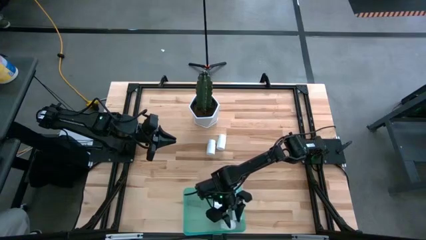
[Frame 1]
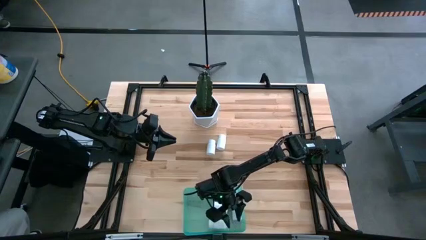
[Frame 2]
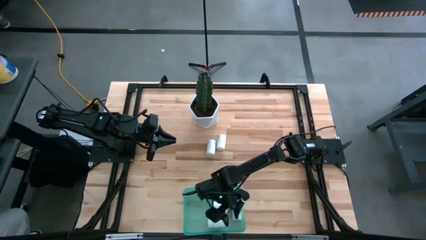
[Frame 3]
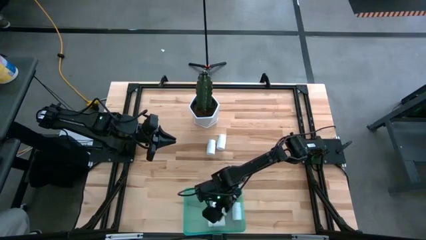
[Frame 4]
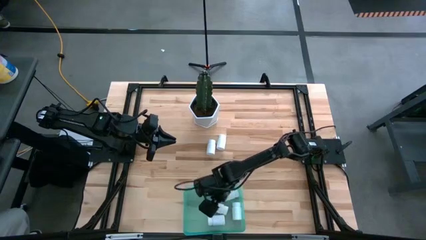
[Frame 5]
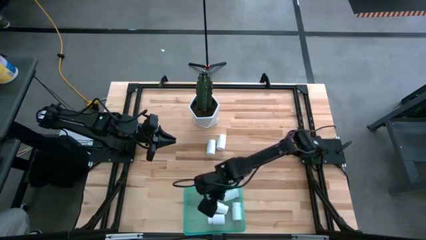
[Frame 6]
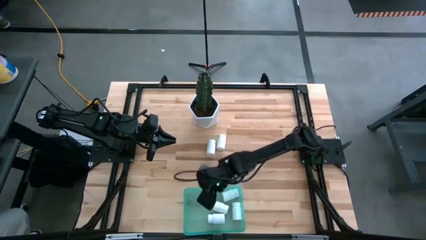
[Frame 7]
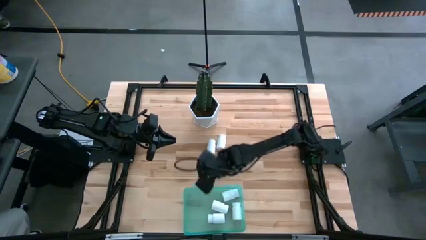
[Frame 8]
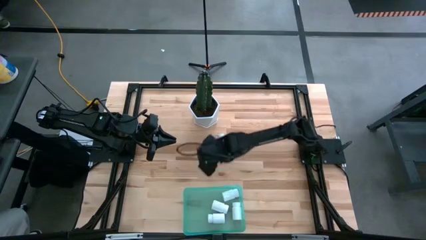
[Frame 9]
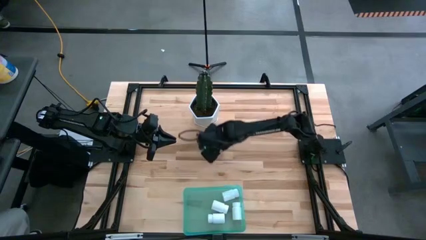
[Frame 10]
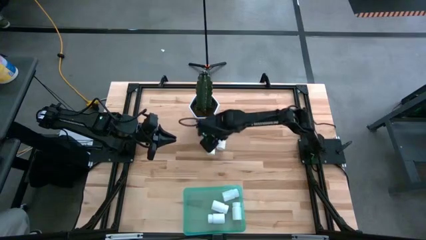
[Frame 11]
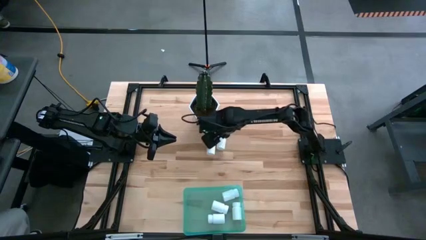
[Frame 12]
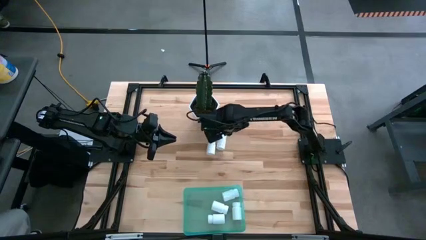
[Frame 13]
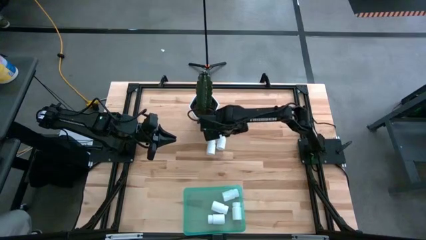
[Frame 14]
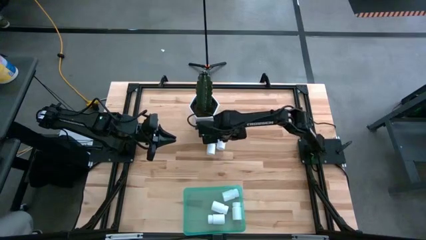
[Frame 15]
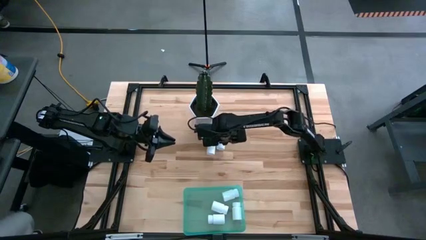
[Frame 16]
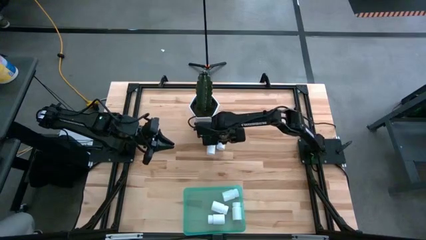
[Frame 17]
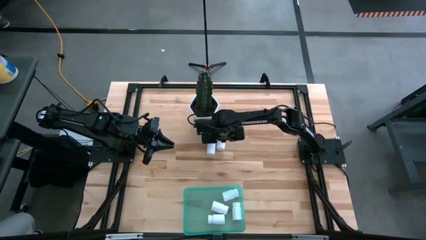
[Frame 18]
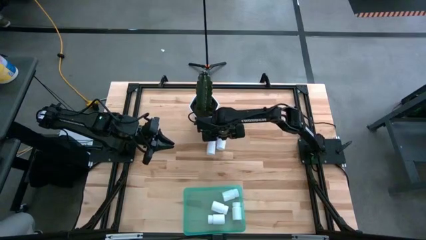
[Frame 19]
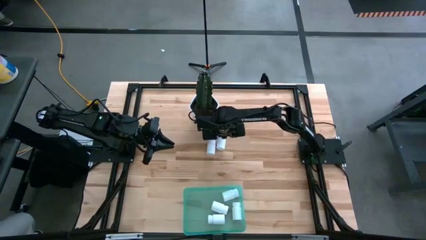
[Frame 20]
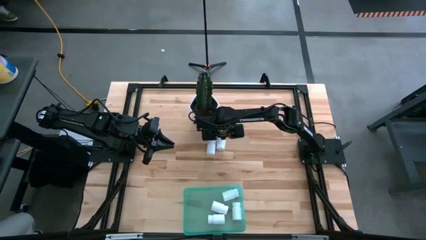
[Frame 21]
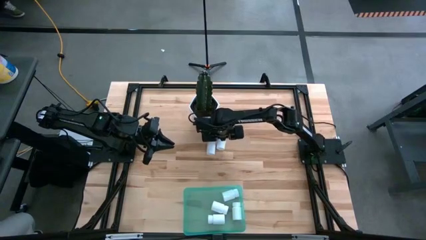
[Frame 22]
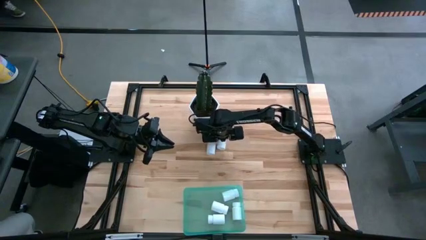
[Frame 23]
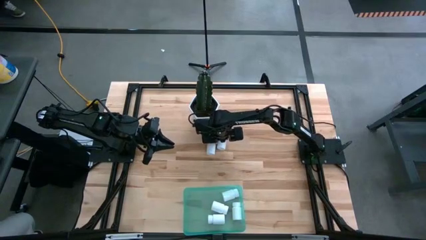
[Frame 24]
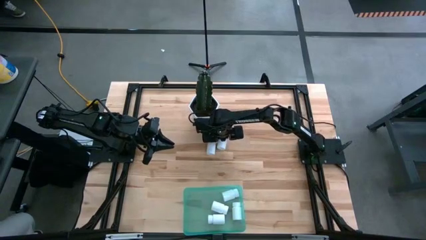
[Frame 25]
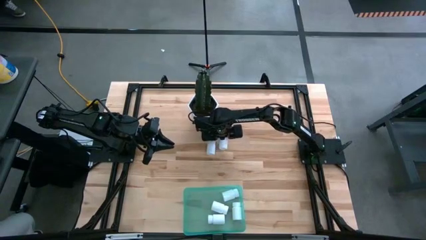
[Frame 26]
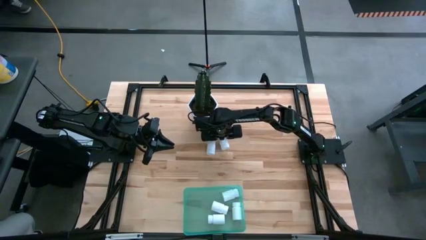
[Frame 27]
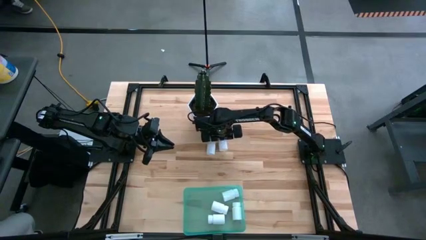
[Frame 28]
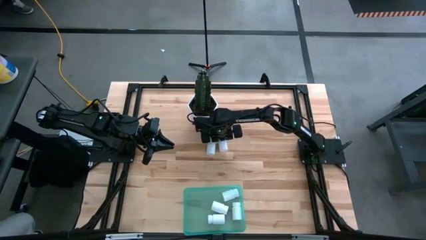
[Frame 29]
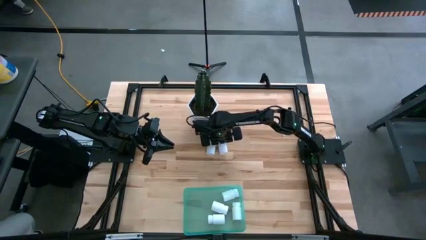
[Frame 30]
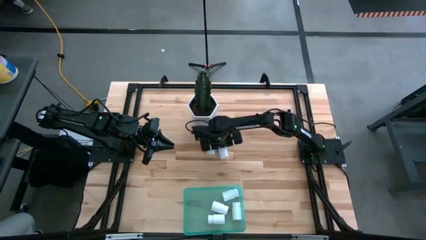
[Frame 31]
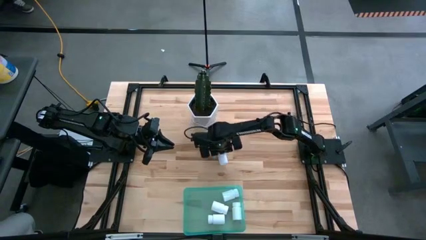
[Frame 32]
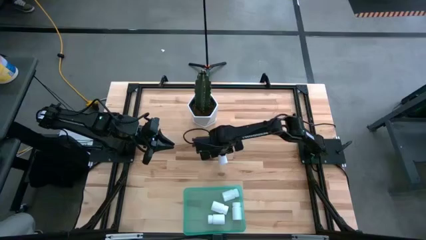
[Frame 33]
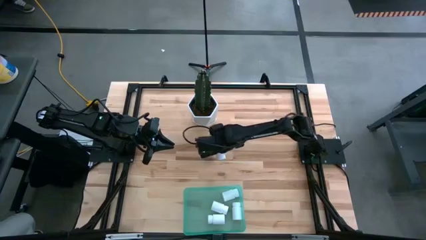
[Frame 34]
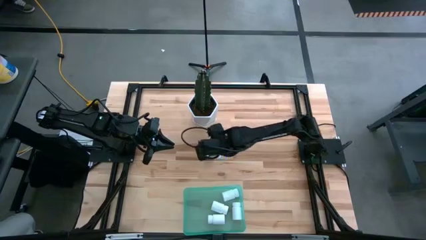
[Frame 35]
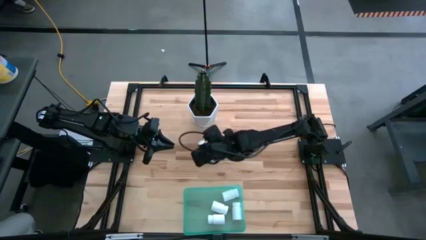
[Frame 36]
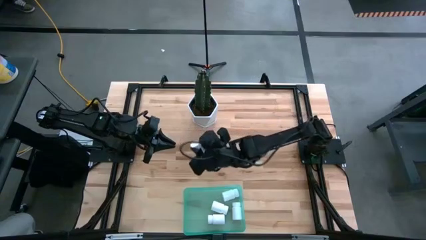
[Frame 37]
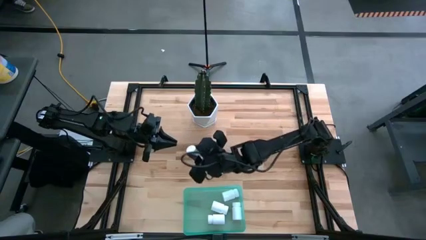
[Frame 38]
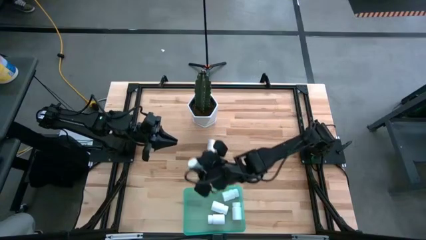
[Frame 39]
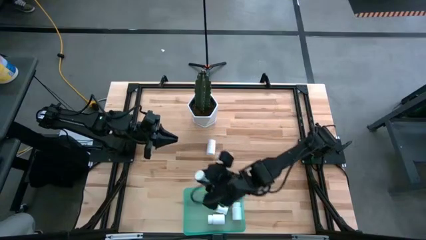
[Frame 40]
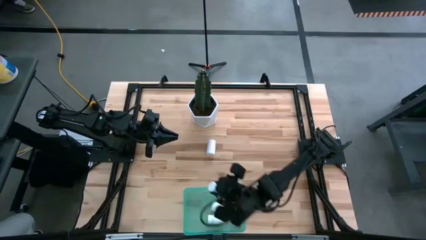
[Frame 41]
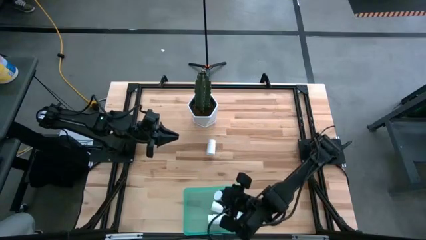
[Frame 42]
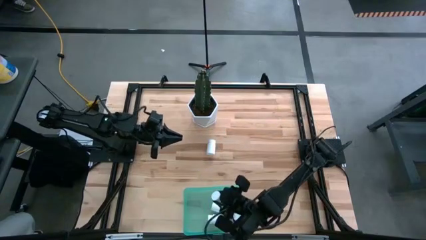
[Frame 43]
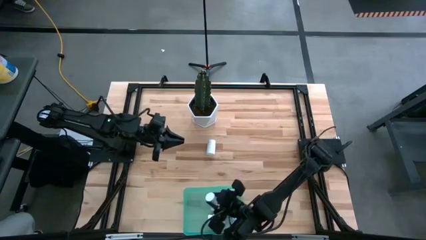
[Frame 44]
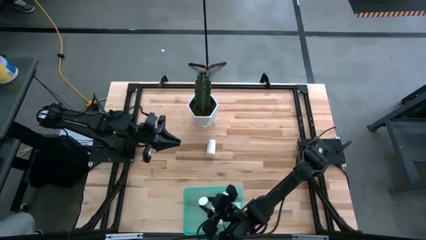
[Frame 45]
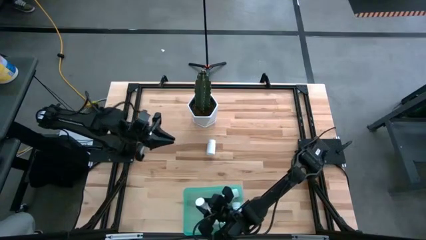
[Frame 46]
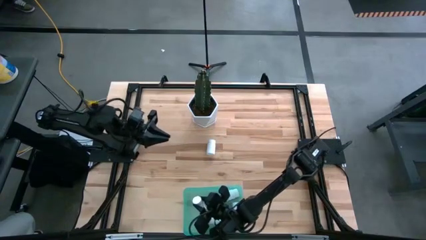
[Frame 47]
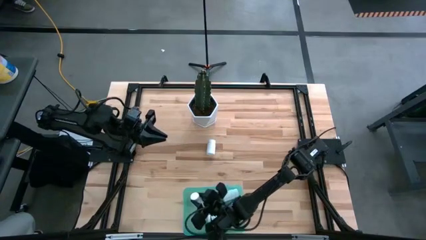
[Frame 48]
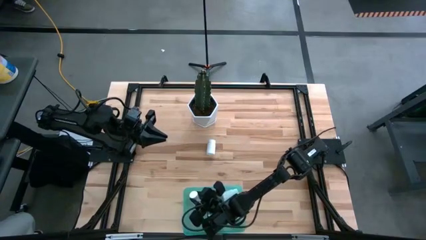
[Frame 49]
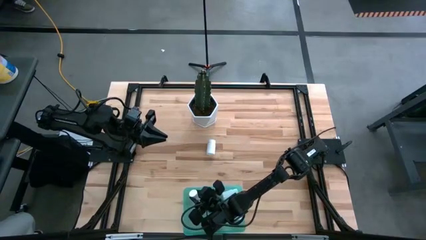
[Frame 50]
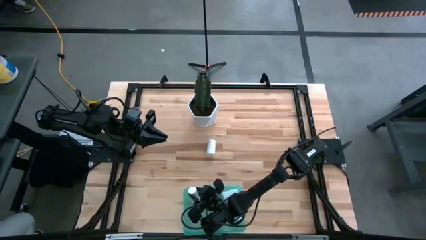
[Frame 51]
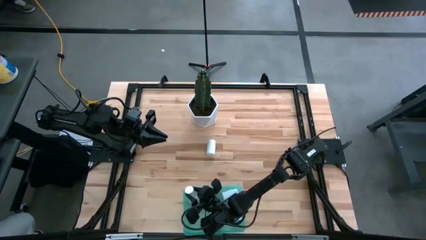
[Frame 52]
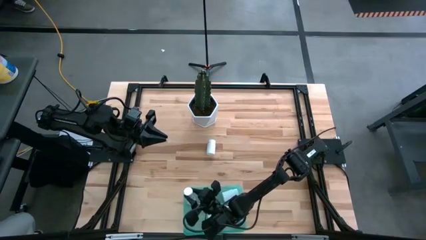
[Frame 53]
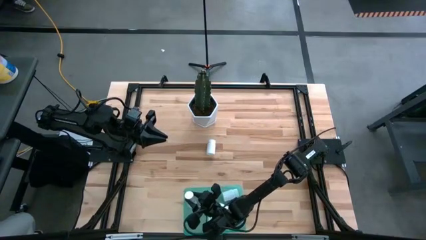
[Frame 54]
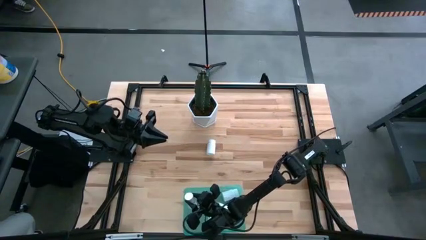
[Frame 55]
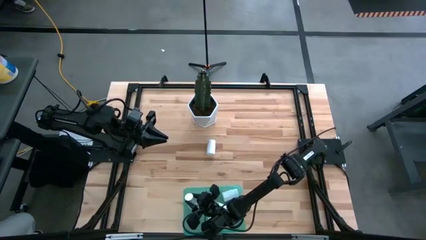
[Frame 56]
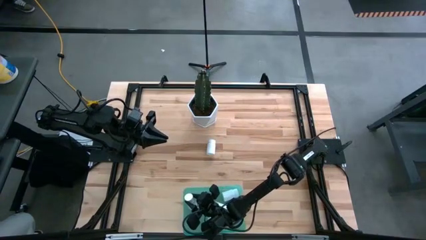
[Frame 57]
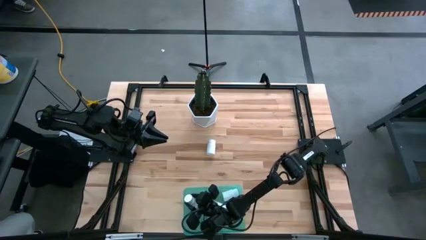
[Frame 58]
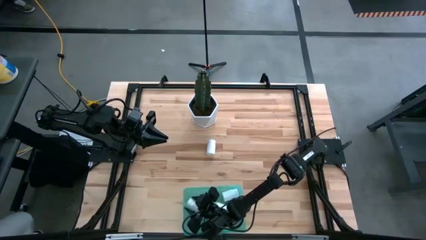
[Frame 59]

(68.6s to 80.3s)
Task: Pick and place pill bottles into a basket
Put the white pill bottle into the bin

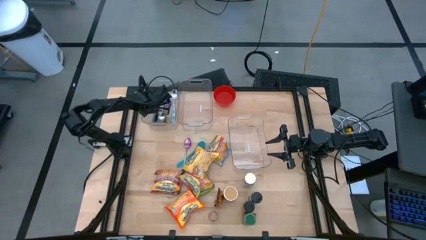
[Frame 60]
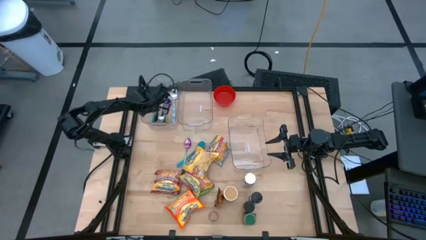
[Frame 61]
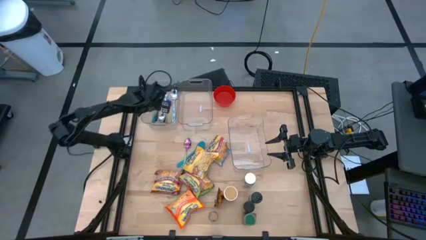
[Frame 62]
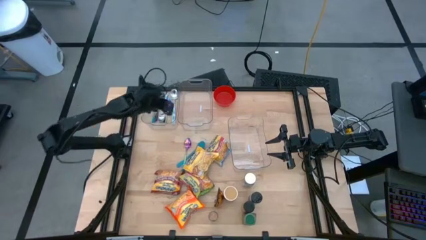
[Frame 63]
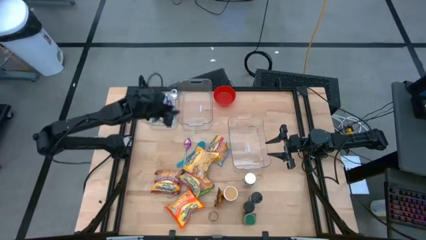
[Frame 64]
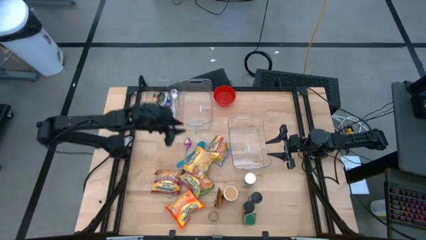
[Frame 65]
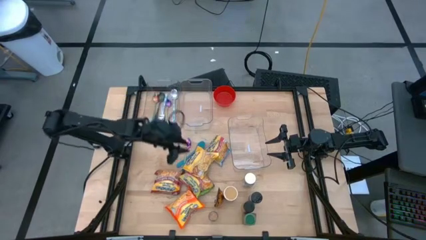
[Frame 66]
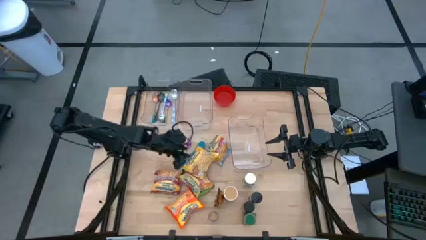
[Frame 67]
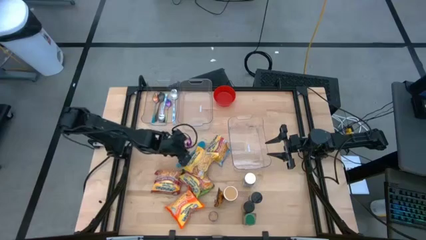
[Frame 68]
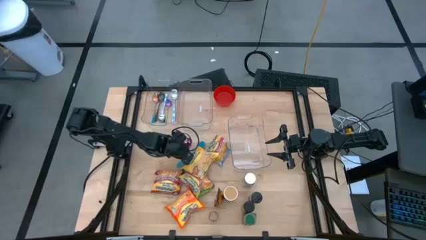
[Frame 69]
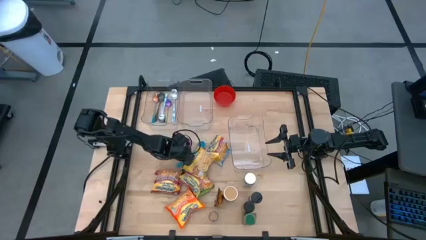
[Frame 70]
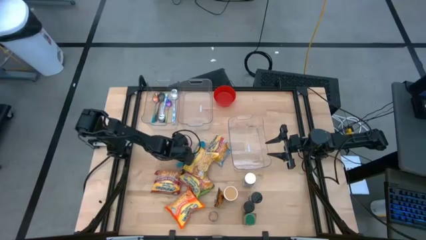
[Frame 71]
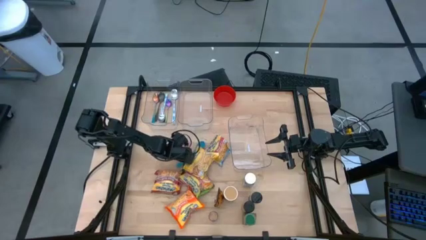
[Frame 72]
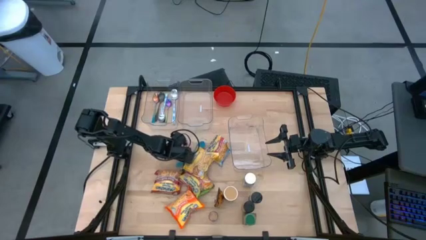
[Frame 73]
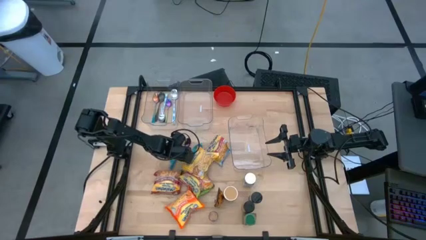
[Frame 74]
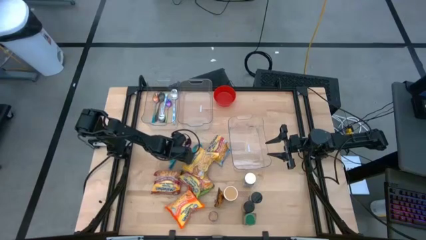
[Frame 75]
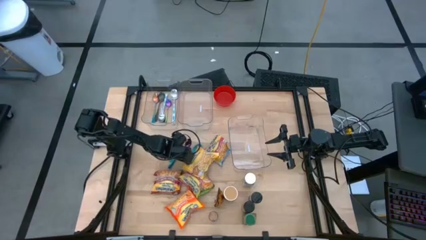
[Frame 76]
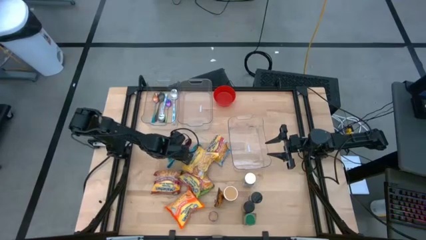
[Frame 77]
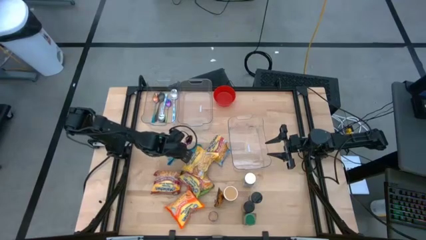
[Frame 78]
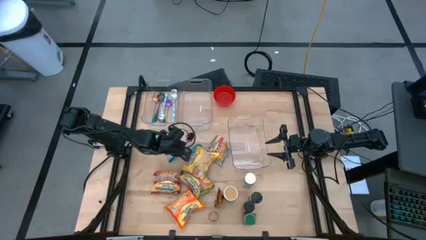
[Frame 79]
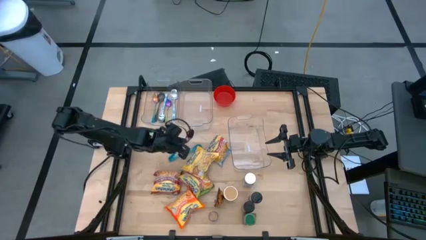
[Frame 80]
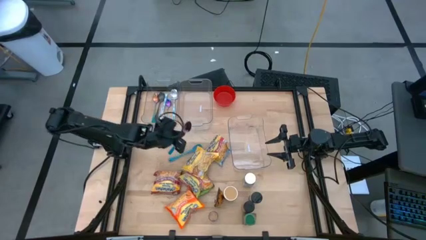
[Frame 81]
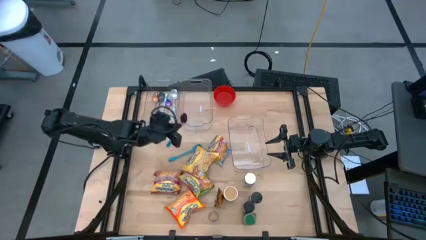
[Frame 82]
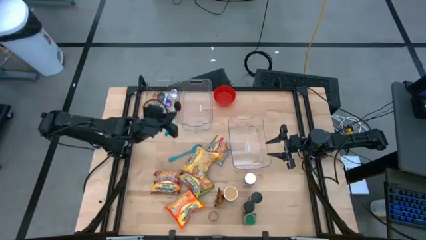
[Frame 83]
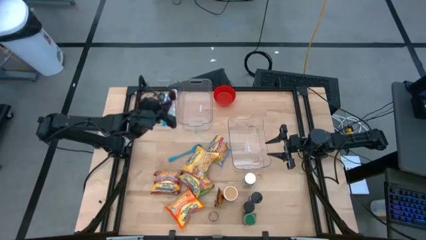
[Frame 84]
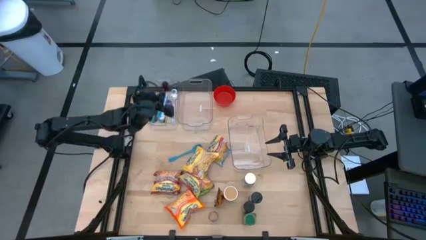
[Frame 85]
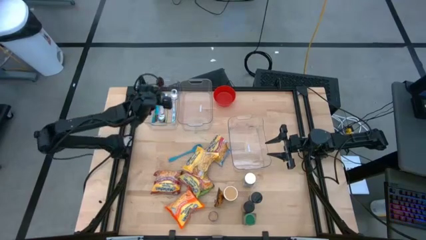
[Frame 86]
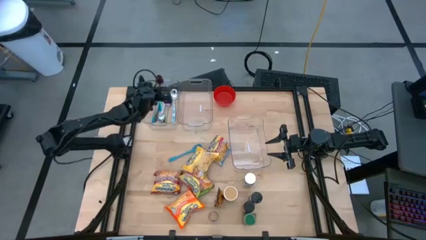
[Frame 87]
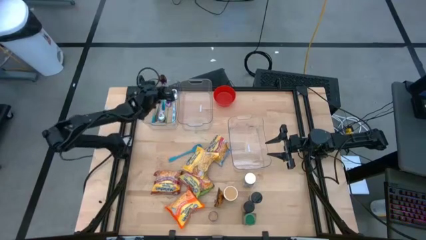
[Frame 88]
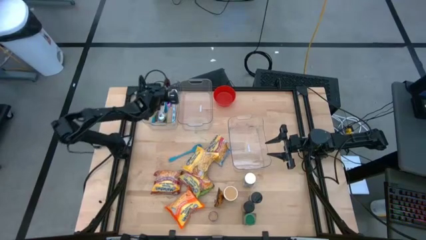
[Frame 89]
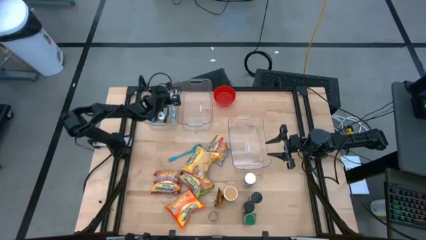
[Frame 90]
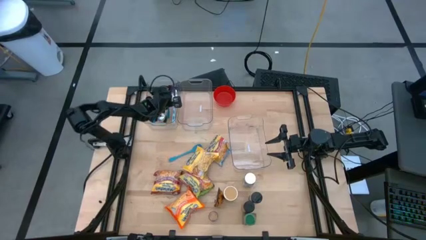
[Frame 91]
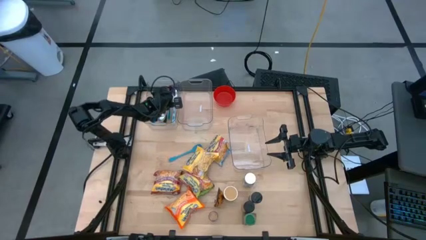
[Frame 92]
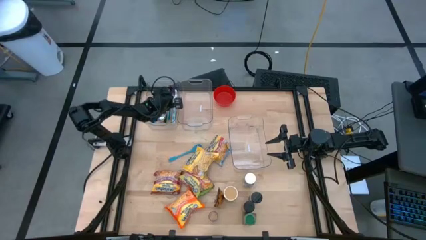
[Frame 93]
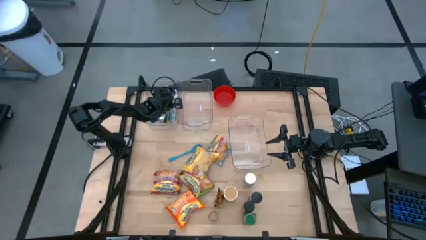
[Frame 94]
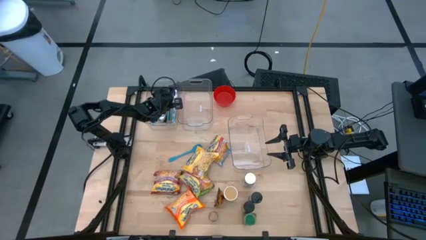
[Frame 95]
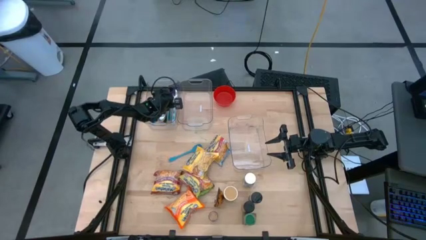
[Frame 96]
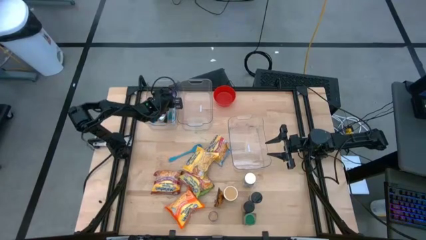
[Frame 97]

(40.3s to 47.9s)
Task: Pick & Place Food Item
Put the violet spoon into the top left transparent bin
